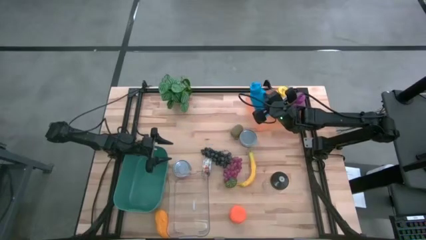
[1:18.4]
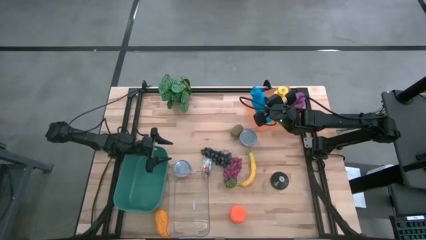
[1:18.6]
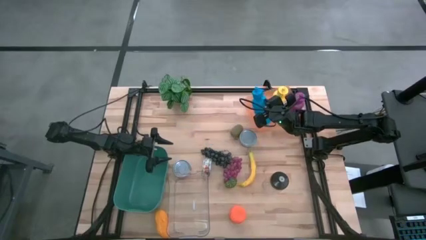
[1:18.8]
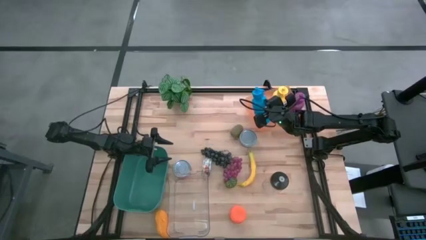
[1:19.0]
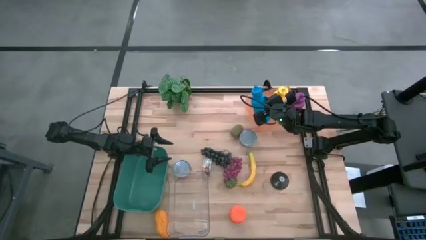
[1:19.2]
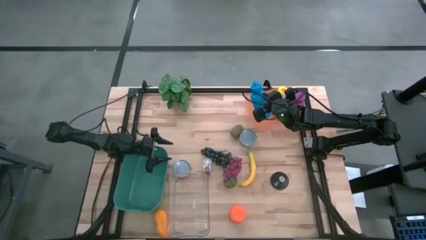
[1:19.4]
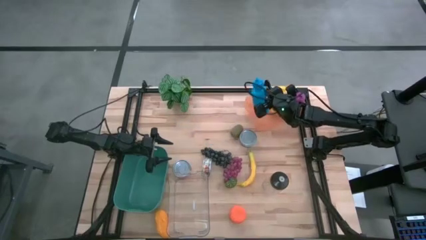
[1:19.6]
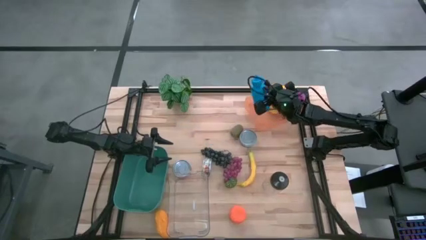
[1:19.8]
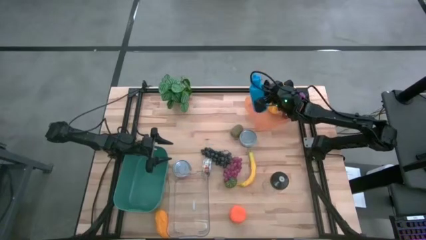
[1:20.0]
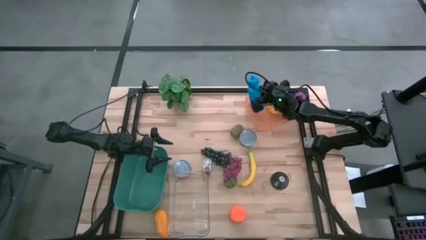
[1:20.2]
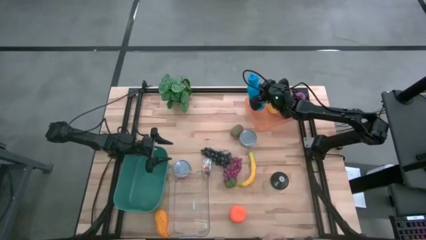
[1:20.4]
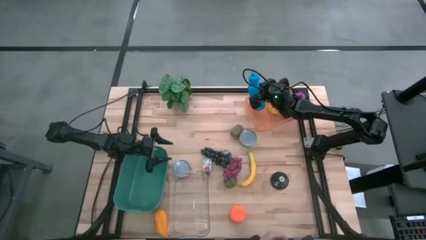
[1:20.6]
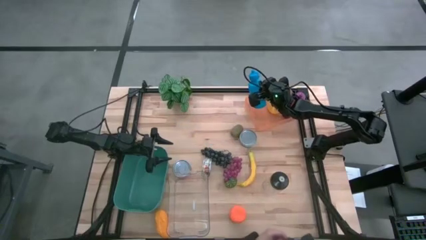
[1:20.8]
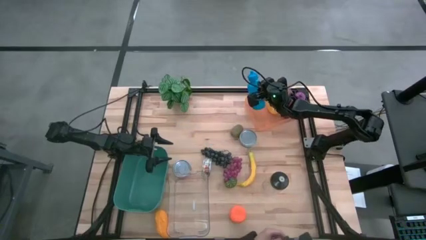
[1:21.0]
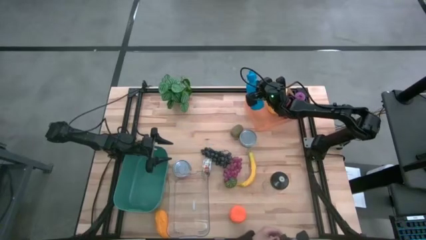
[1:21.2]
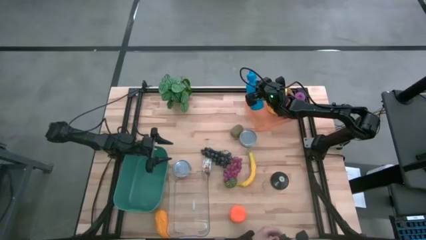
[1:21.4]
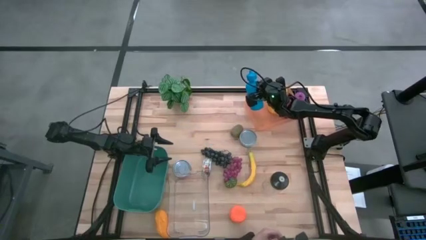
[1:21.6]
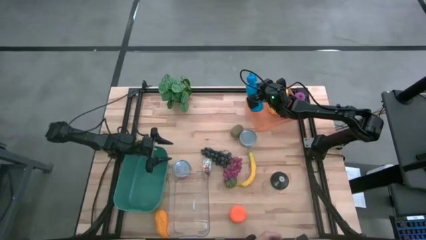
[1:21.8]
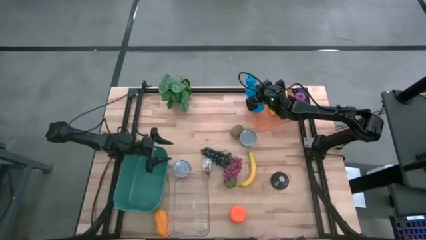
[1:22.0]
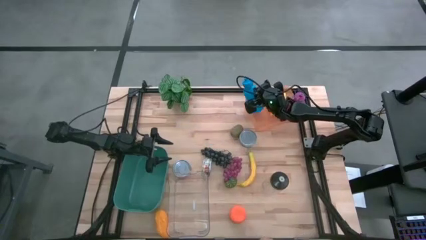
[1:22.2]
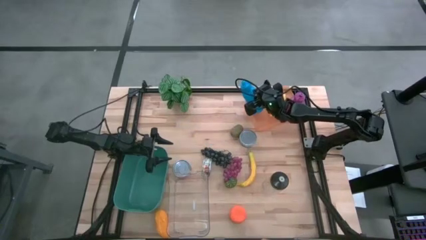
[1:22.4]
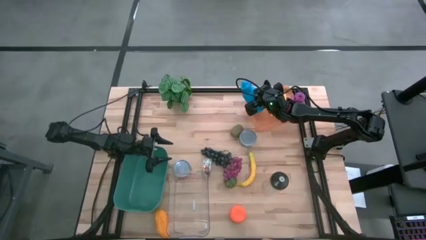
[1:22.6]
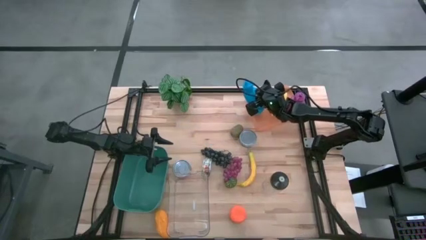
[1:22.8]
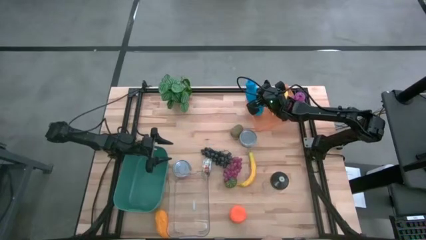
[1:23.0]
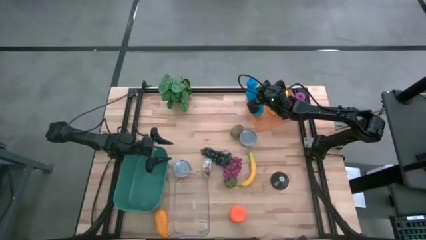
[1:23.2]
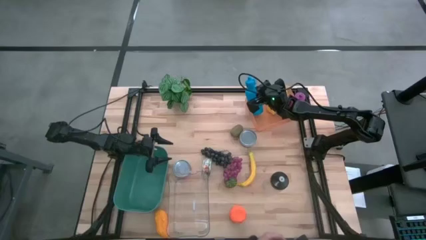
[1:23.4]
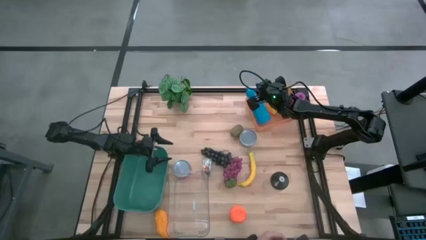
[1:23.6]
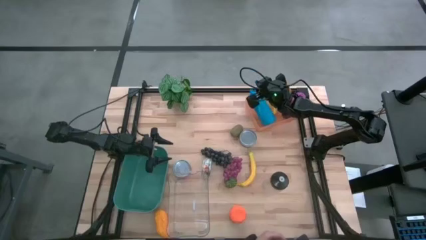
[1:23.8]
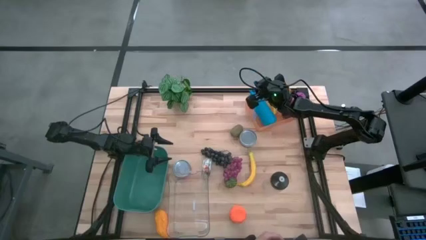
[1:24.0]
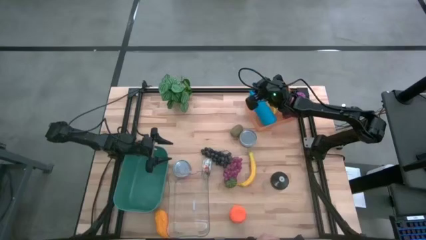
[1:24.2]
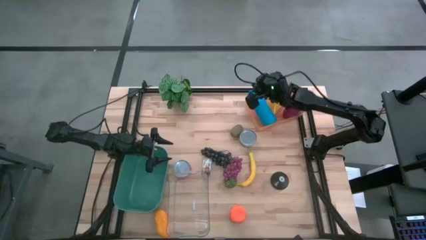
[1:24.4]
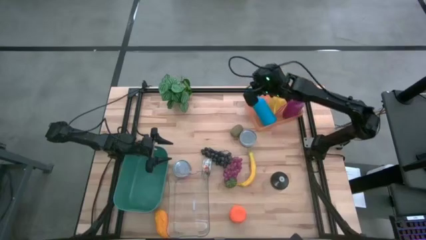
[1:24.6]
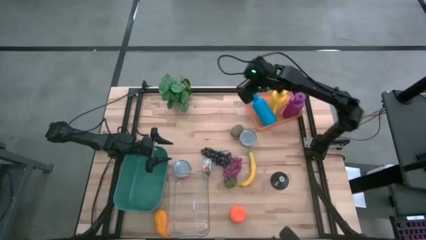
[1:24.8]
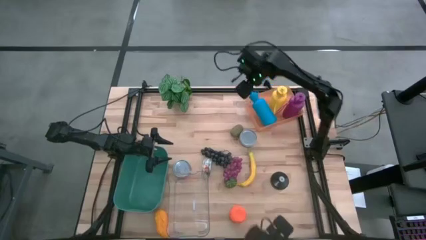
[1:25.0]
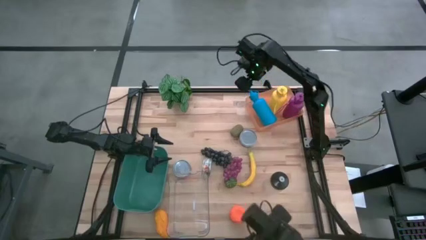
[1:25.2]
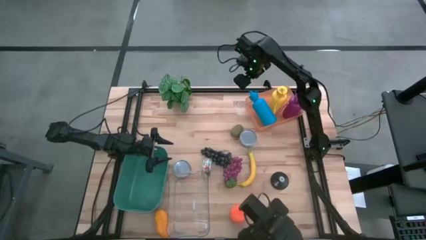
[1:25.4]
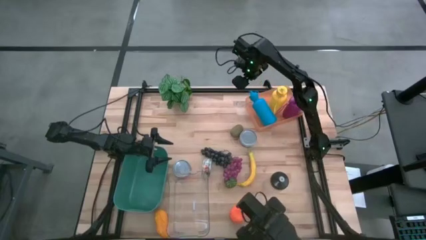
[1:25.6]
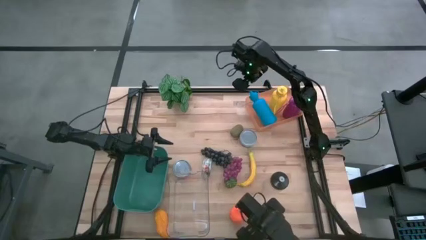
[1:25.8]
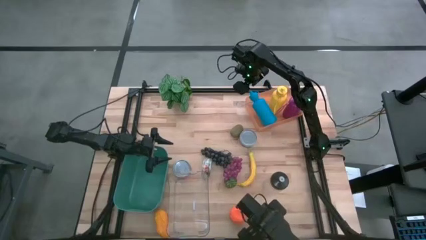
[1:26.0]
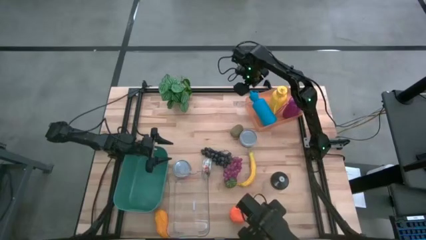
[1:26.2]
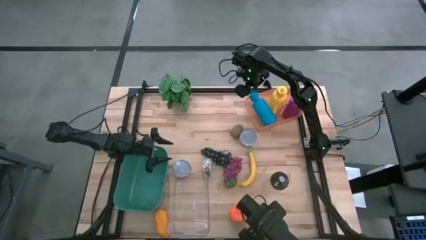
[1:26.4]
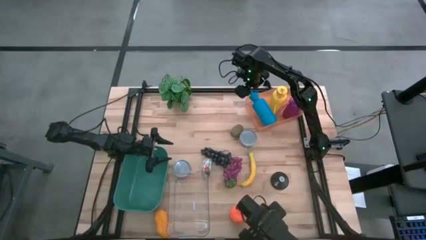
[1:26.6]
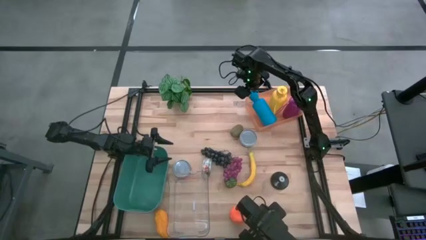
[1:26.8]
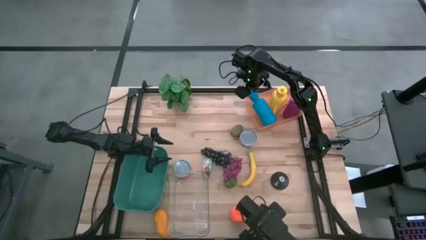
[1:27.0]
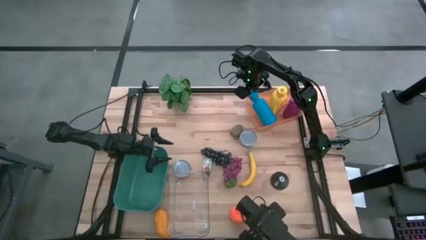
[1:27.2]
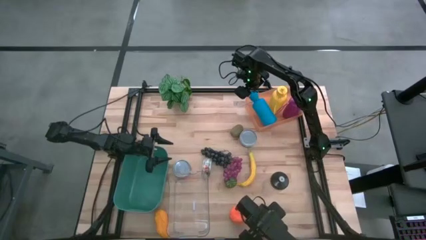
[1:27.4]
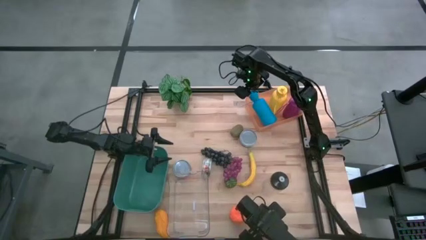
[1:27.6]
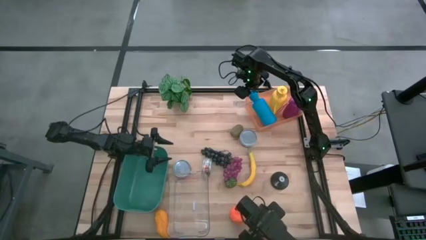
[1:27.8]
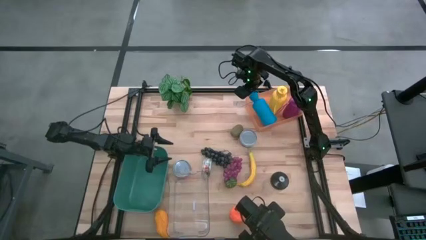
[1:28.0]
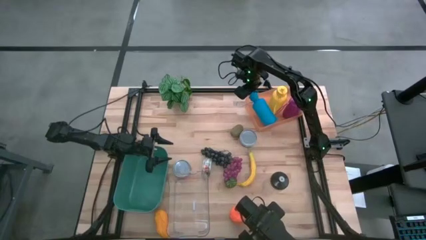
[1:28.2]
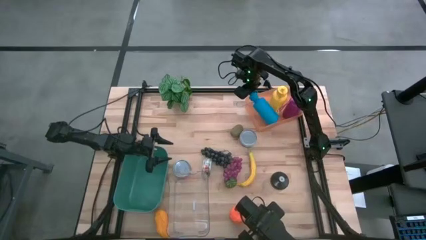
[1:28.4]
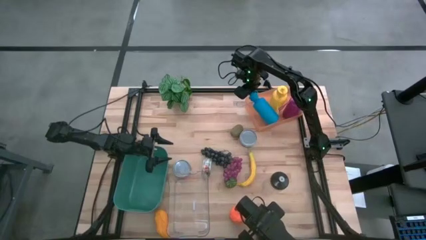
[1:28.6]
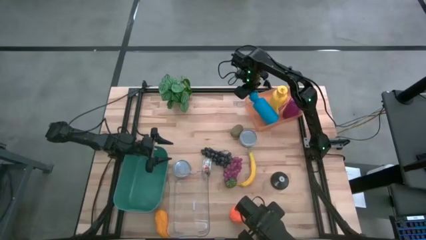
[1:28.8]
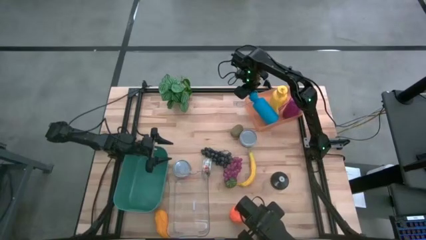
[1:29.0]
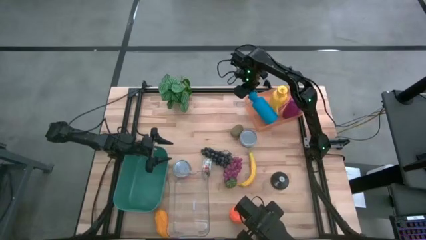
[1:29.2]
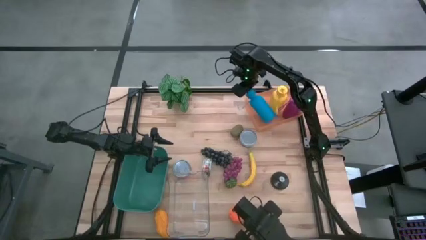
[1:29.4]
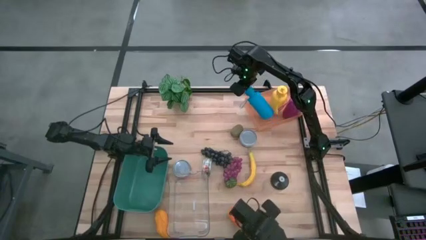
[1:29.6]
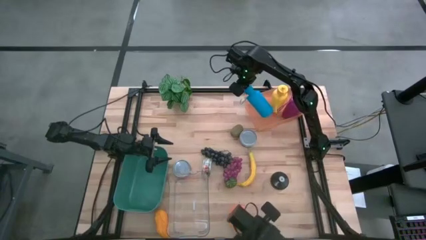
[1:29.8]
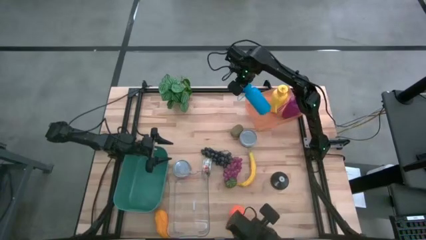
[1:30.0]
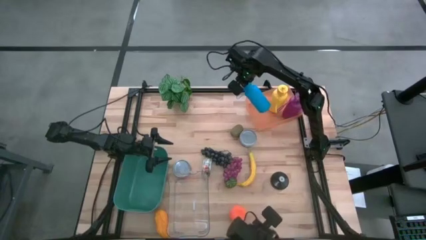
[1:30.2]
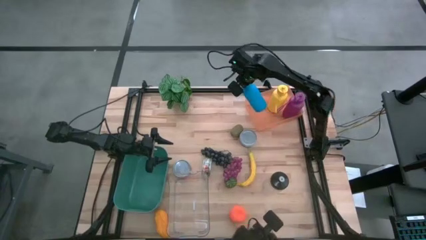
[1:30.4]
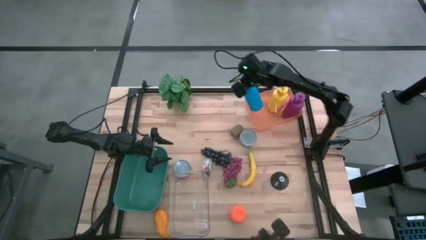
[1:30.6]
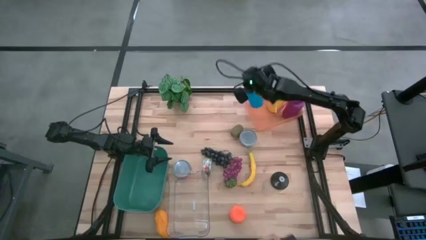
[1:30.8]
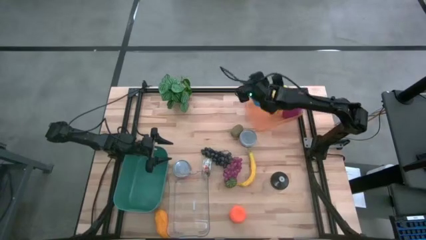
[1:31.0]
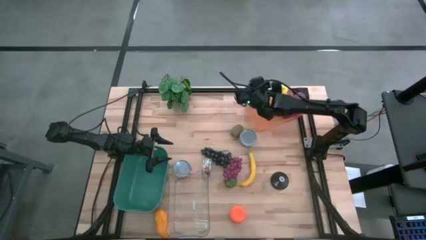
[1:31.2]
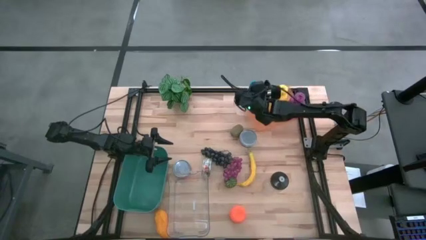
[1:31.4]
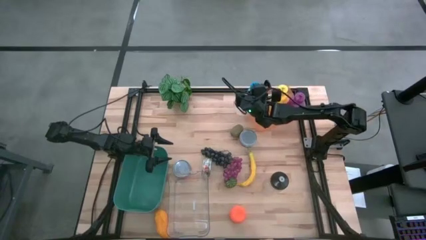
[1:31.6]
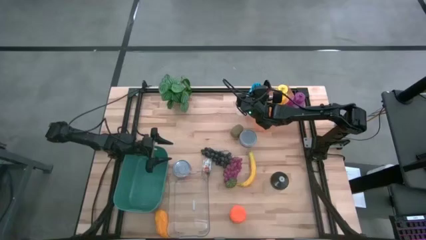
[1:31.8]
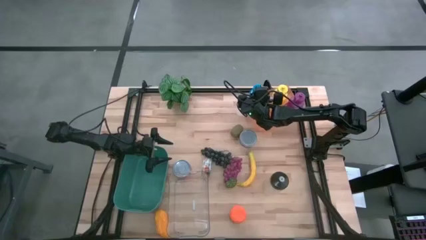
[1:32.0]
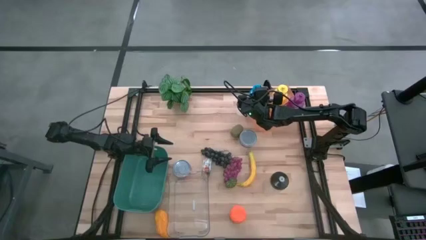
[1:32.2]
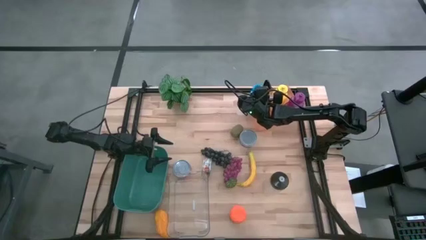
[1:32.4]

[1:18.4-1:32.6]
Task: Pick & Place Food Item
Put the blue tumbler into the orange bin

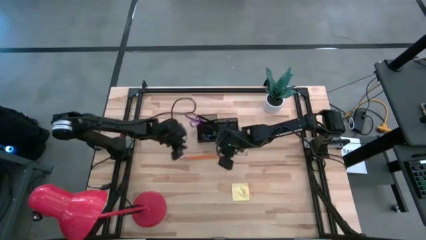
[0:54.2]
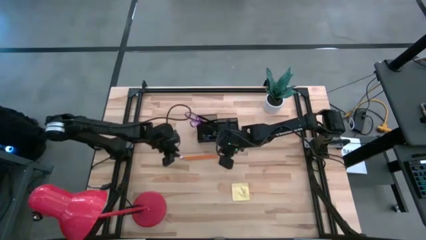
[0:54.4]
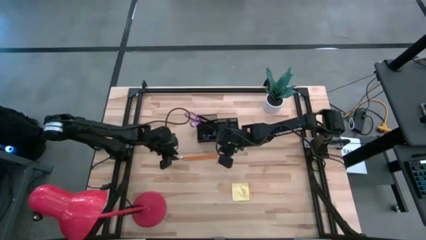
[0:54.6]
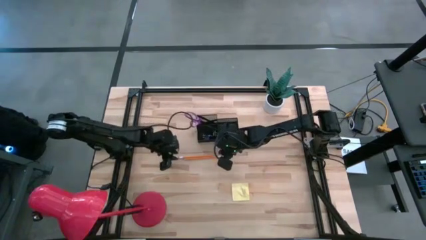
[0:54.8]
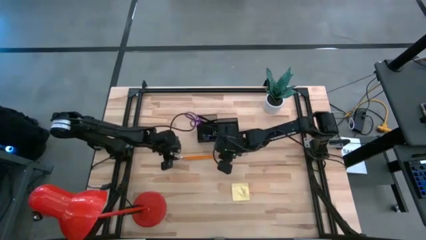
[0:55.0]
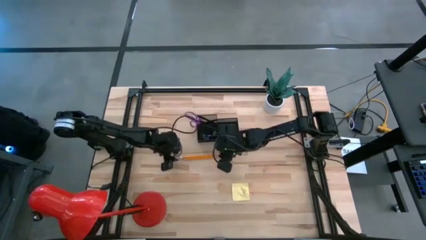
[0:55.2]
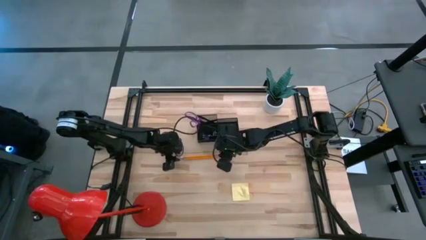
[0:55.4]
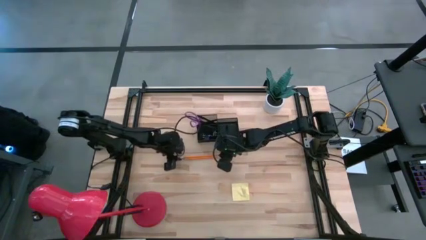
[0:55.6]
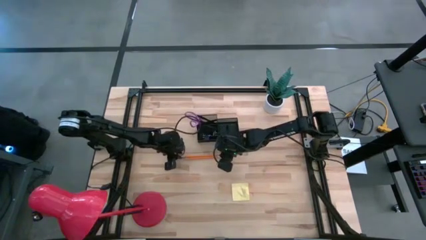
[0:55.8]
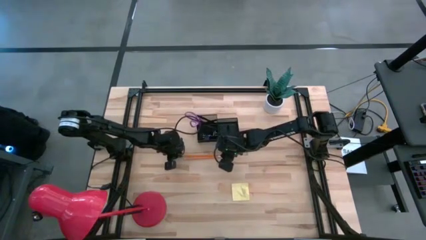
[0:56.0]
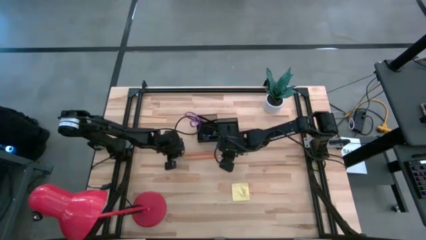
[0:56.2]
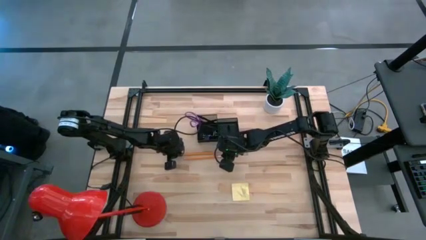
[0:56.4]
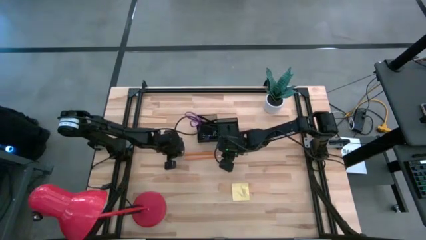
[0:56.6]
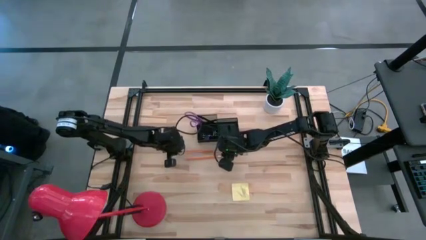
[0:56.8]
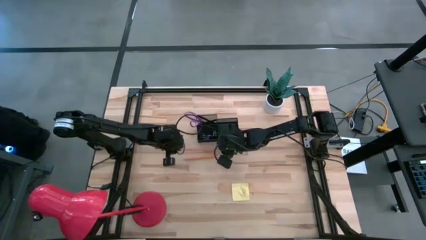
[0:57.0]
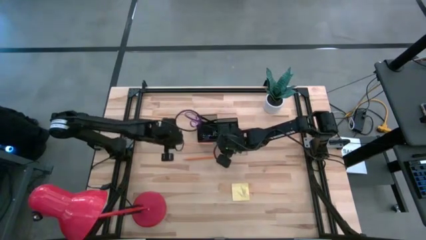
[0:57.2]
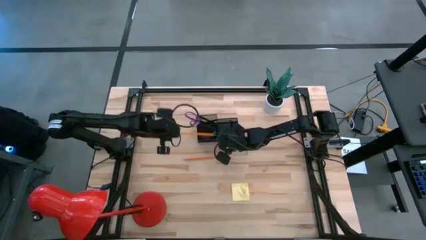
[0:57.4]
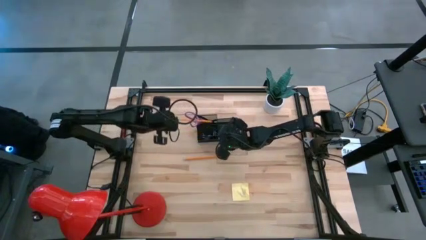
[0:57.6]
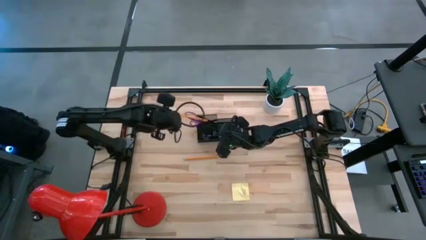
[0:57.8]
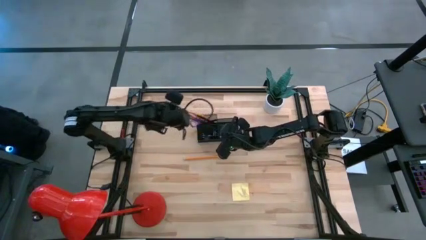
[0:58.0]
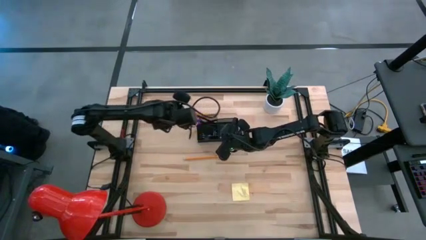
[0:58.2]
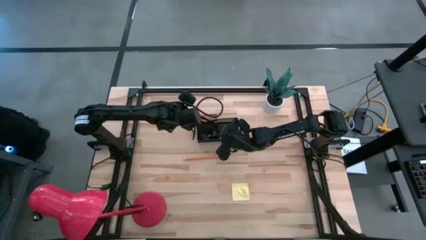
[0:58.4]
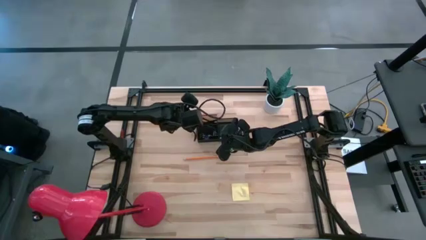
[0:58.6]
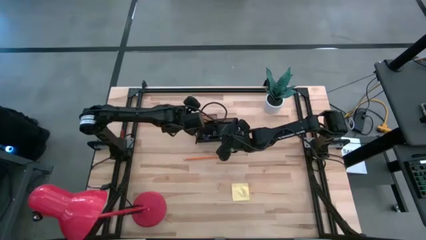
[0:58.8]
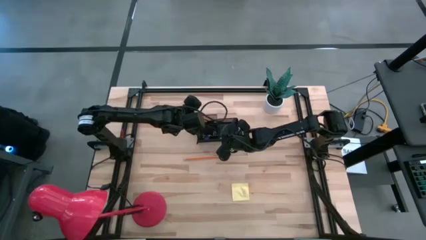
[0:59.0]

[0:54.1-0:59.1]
Task: Pick and place office supplies into organizer
Put the top orange pencil into the black desk organizer
